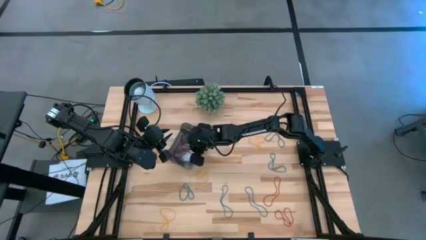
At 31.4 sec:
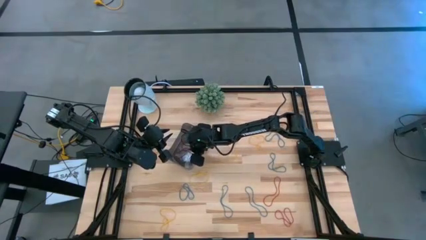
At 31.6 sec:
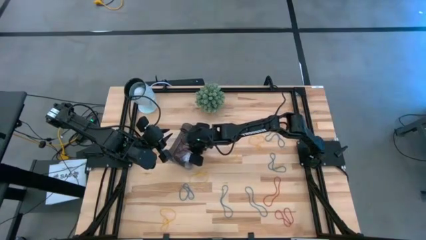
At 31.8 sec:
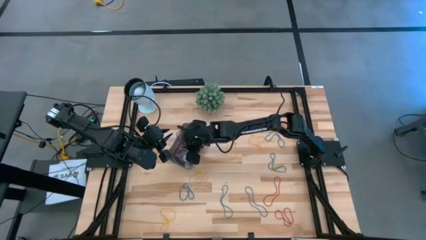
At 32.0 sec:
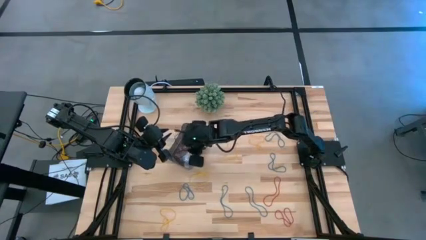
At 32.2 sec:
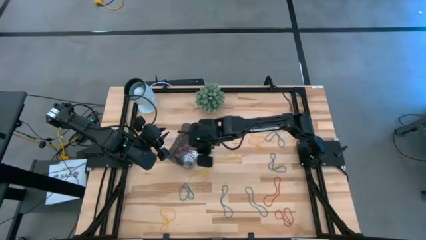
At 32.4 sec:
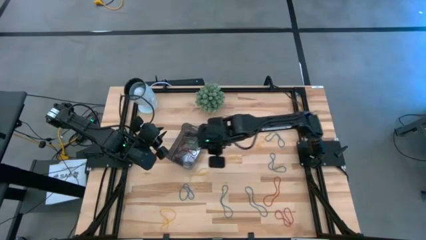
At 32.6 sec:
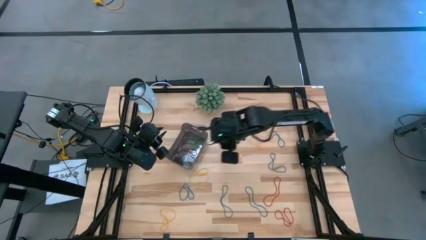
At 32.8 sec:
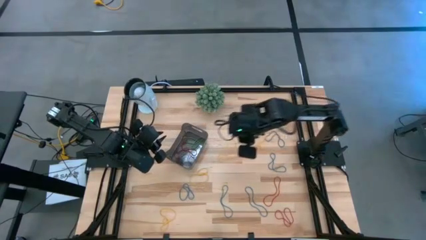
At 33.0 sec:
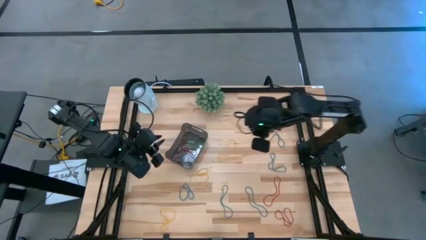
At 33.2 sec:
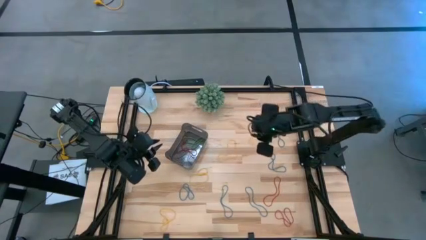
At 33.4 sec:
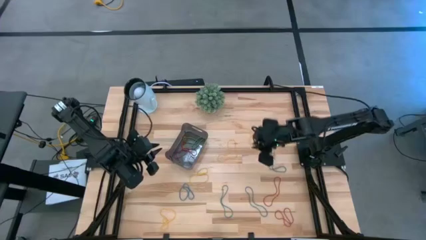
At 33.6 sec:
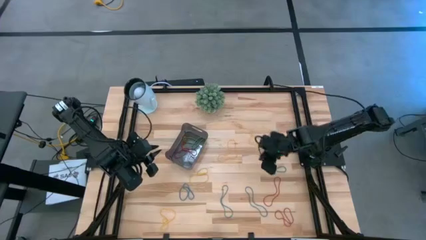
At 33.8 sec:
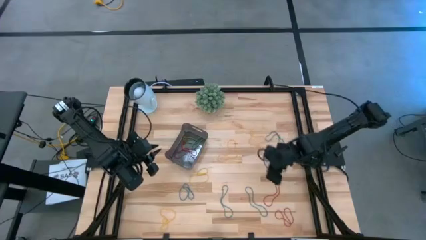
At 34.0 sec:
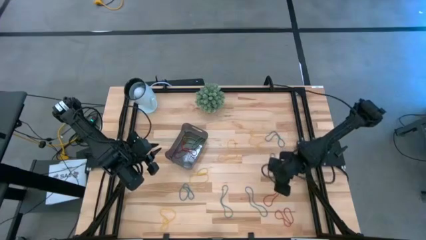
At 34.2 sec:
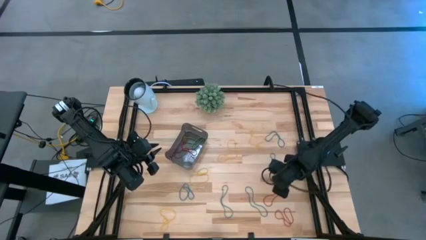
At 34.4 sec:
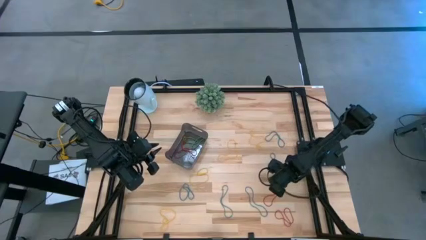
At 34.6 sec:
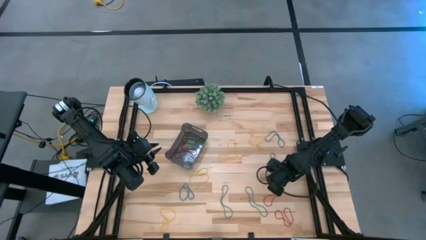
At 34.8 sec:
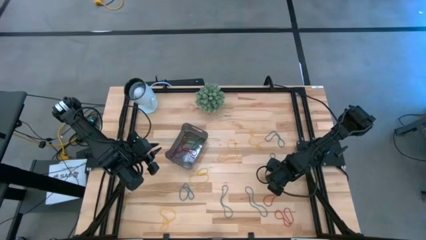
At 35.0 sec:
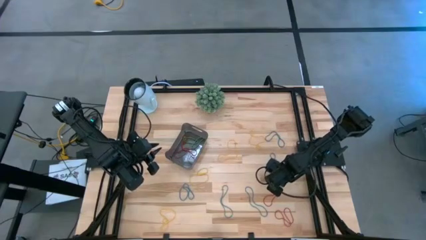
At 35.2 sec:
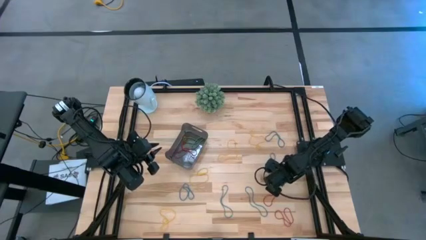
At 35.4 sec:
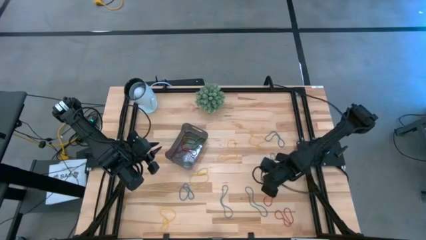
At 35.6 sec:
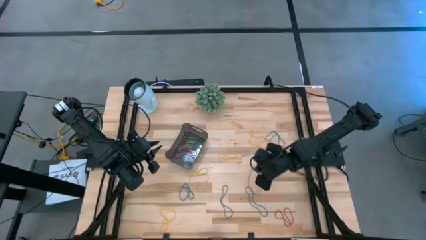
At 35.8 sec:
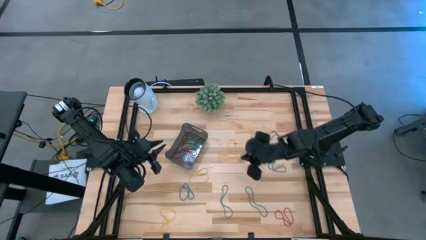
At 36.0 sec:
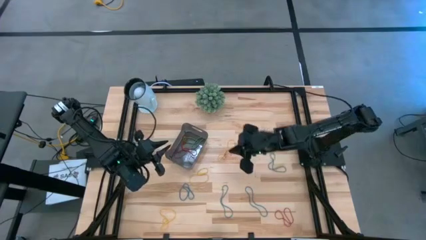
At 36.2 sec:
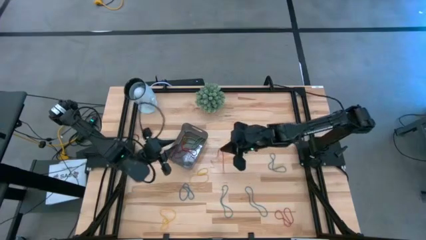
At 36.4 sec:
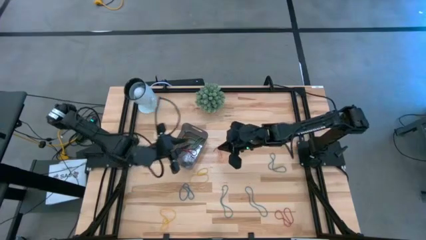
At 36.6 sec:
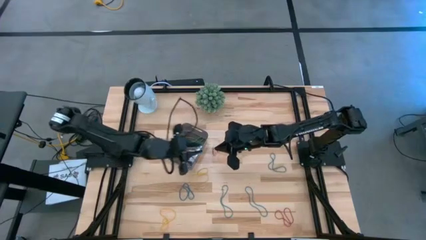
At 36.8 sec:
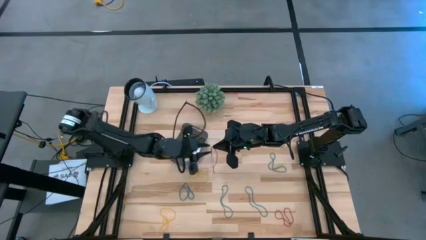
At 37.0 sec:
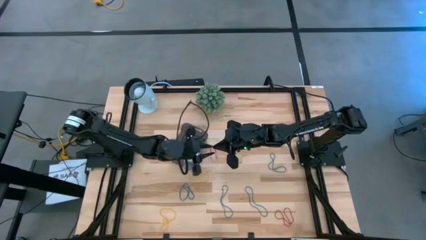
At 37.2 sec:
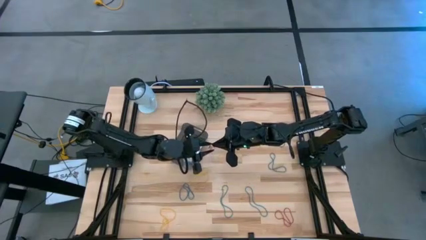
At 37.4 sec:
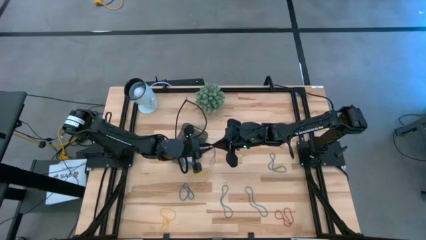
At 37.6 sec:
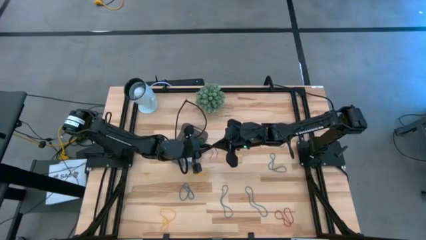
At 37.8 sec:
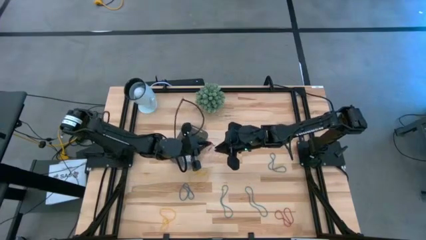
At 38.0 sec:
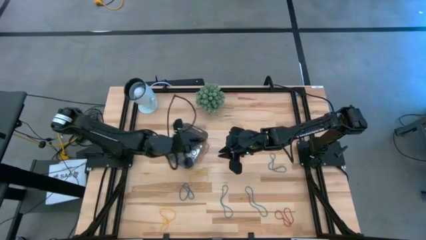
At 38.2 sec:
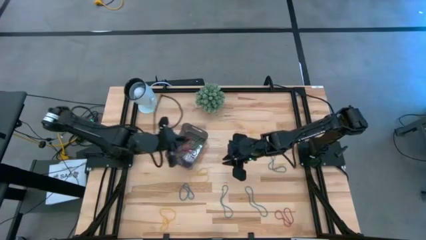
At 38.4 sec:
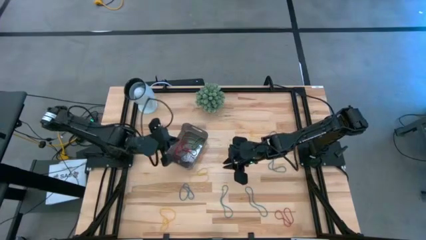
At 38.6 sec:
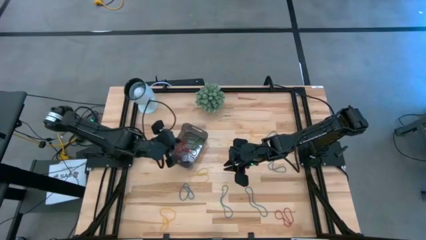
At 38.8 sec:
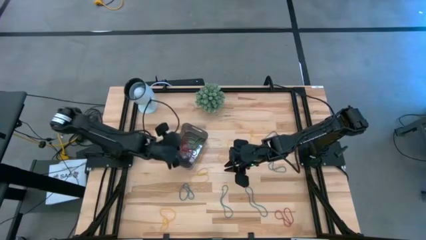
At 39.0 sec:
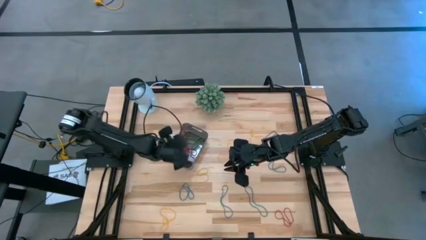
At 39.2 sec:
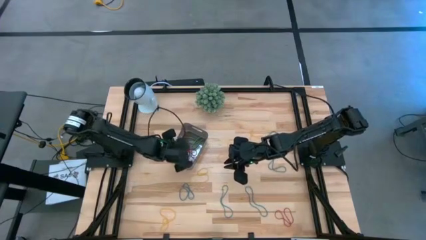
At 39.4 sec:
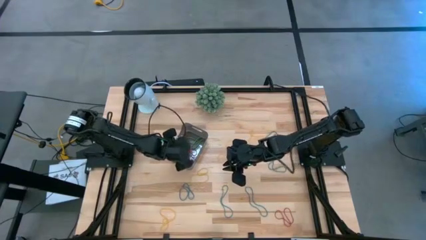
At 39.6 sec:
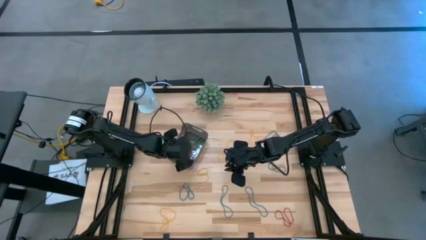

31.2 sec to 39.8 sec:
Task: Pick and place items into bin
Put the red rubber band into the black bin

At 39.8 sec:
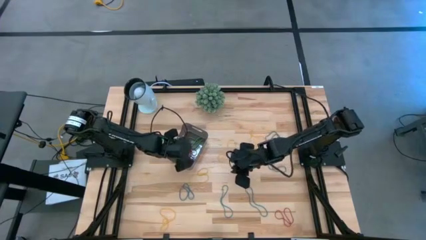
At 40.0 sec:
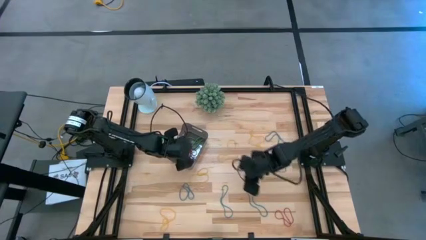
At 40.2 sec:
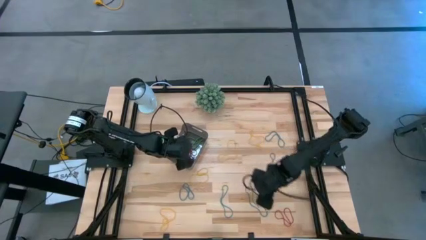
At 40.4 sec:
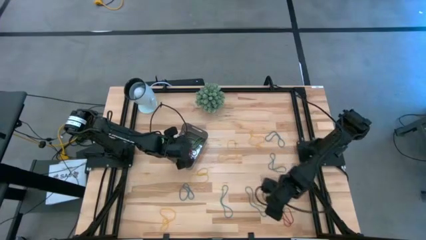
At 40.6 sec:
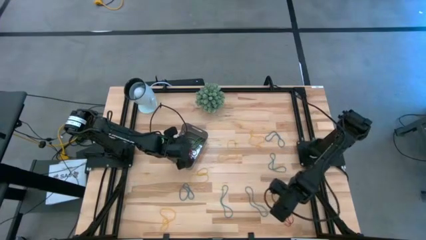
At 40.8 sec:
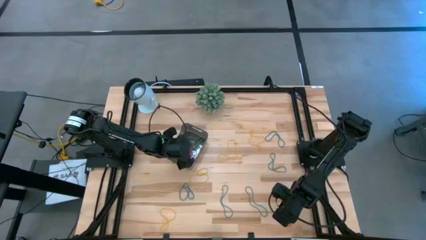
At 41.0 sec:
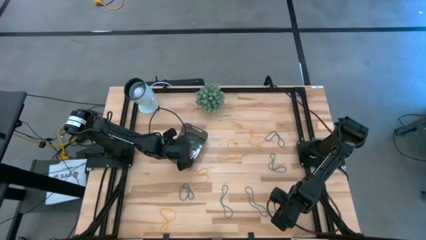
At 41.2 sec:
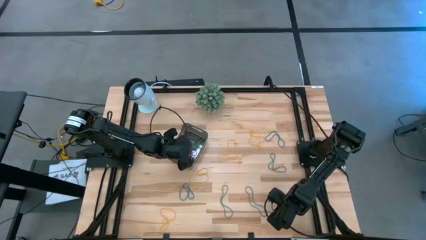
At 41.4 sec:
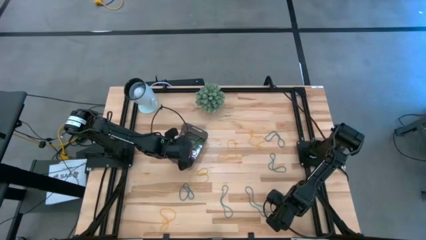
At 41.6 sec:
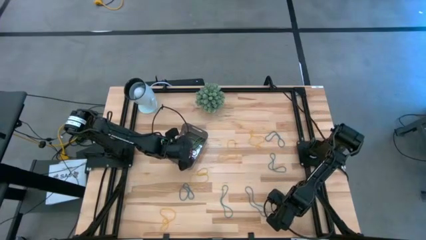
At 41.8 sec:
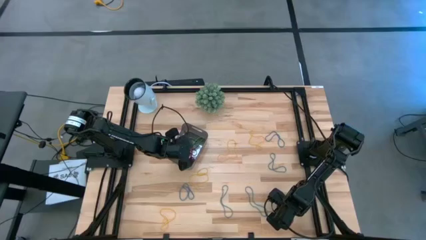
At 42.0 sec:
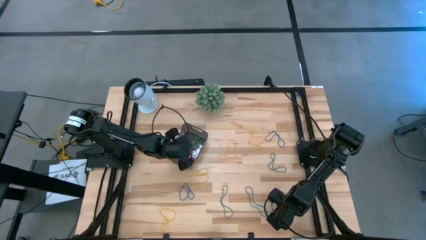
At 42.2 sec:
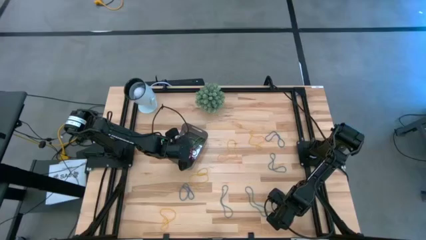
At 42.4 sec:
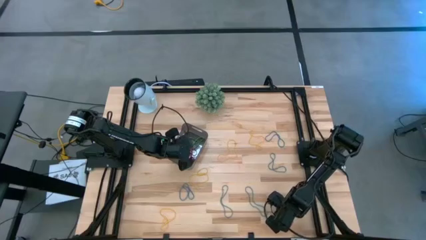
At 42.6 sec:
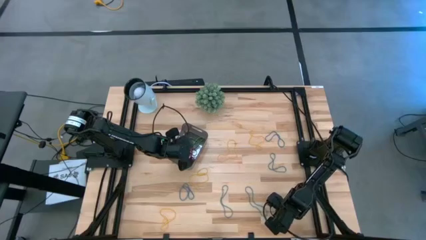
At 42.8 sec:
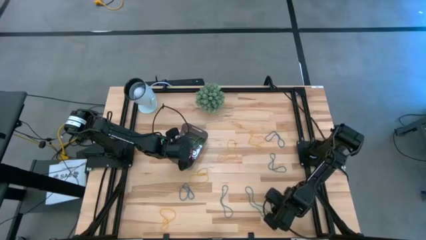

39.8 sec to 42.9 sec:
Put the red rubber band into the black bin

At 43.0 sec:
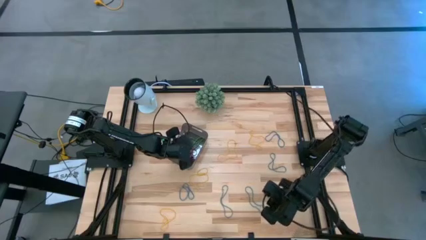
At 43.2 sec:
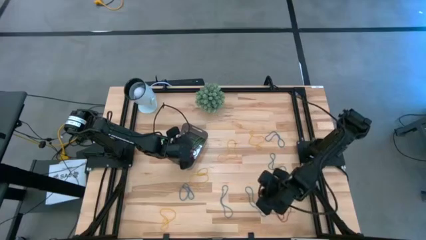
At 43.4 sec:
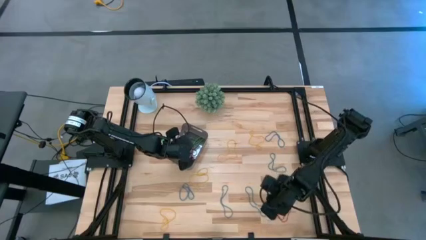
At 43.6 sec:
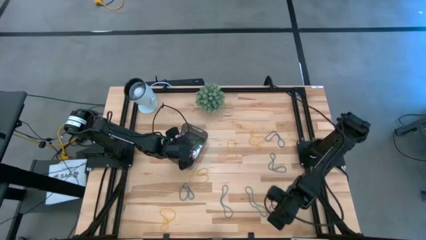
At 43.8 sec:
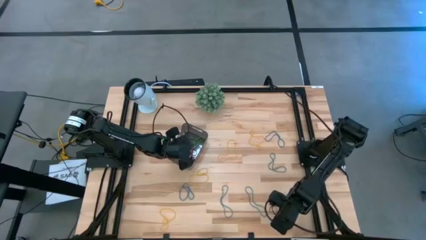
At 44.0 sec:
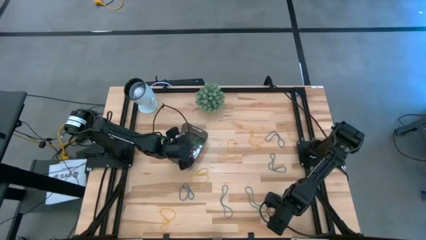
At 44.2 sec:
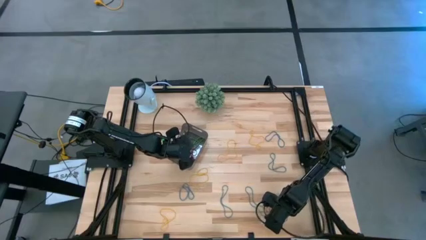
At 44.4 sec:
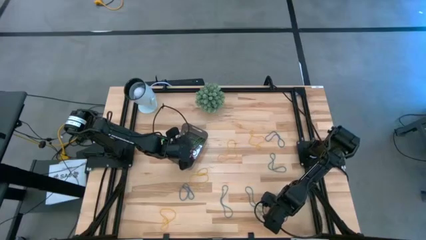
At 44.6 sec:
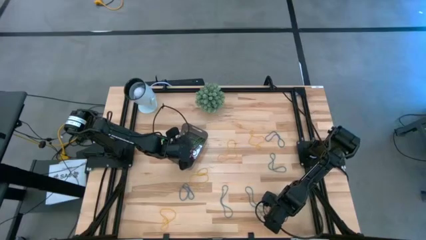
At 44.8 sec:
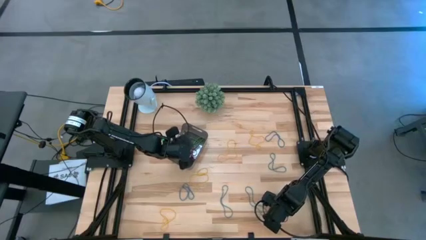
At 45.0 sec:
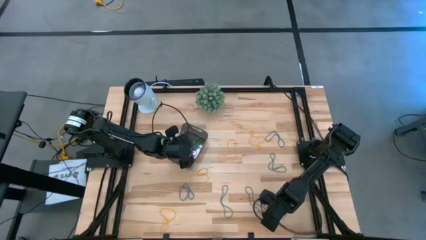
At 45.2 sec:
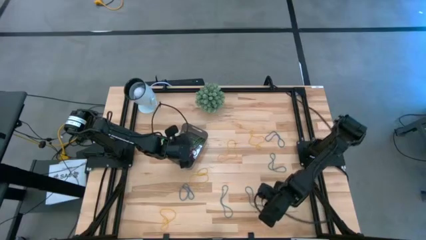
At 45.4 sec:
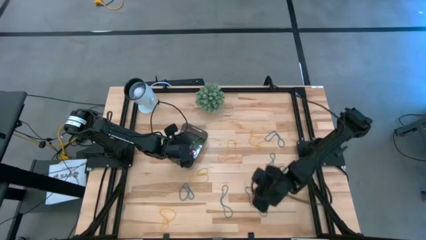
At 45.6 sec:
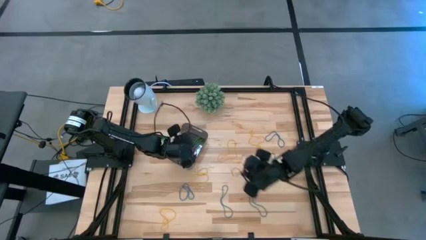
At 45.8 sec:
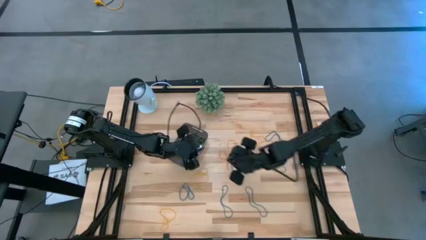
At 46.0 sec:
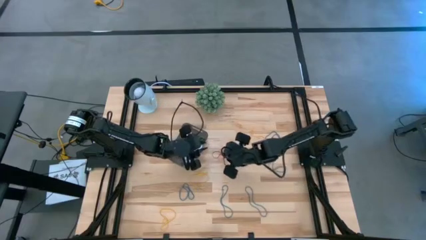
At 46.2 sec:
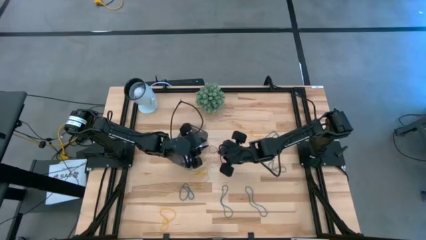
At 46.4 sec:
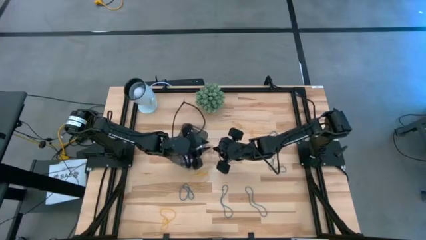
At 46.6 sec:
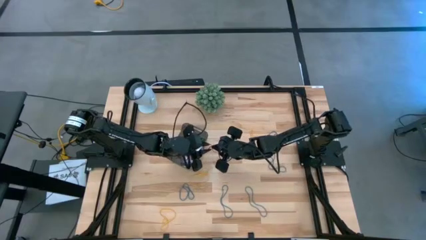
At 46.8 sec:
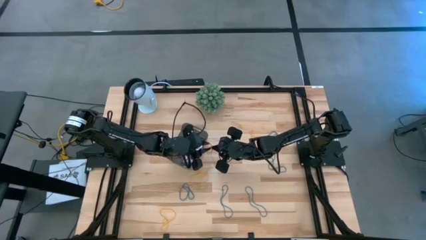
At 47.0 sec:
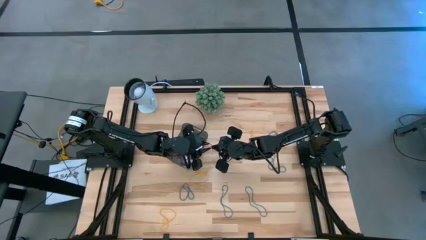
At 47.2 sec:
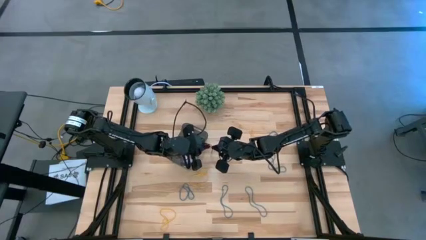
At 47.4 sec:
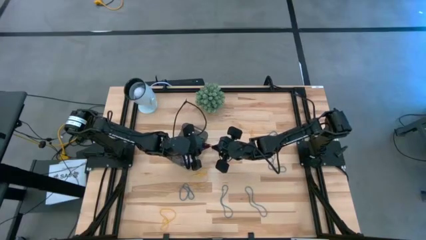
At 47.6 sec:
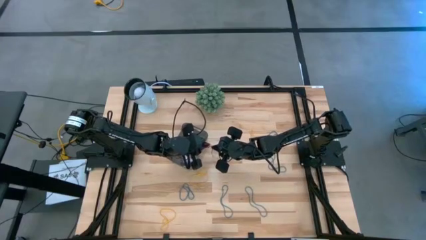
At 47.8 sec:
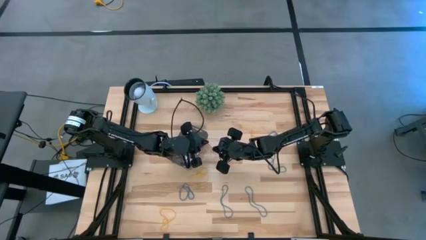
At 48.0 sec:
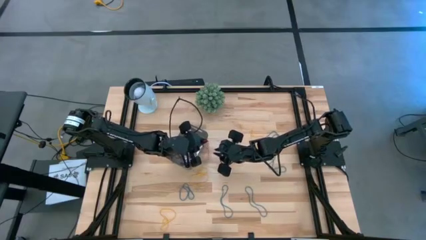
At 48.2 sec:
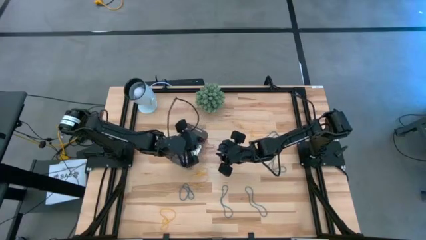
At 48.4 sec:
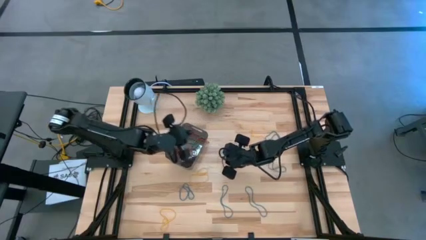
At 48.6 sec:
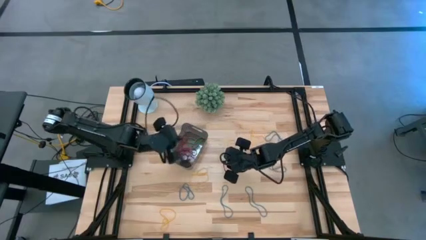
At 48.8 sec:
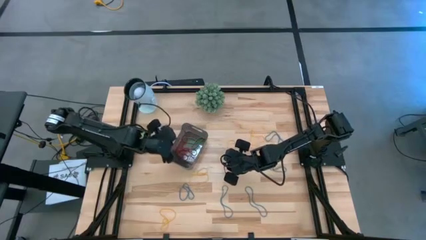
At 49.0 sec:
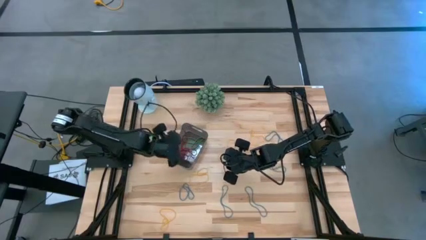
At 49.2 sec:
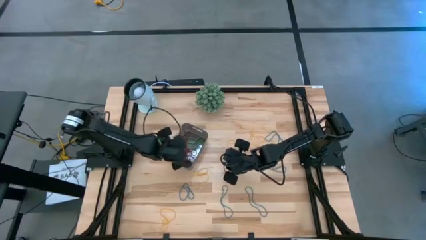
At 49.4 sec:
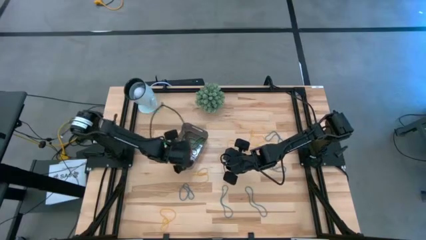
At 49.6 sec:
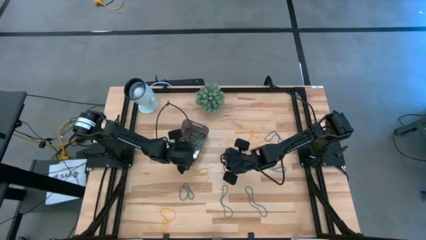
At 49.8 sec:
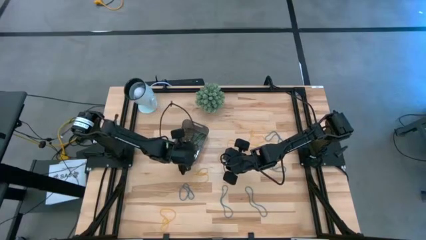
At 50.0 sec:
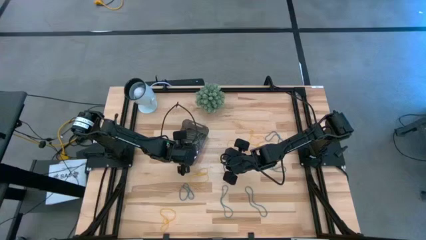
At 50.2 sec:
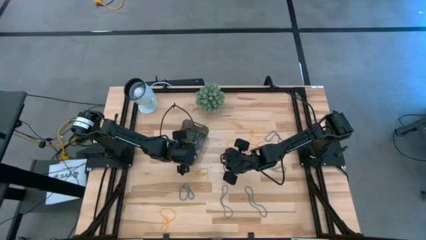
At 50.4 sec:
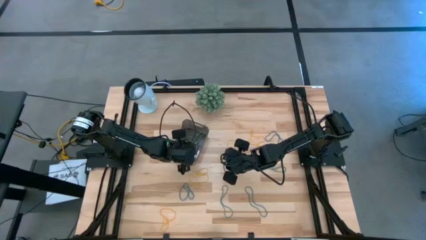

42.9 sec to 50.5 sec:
Put the red rubber band into the black bin
